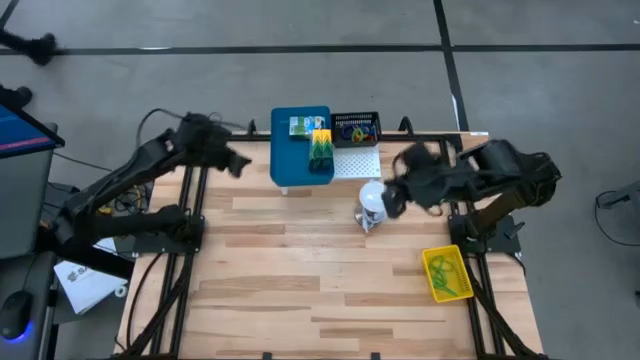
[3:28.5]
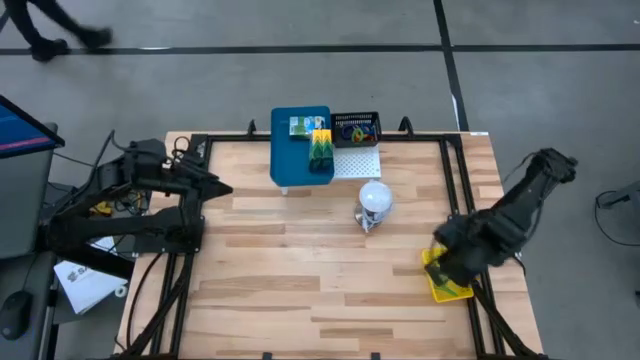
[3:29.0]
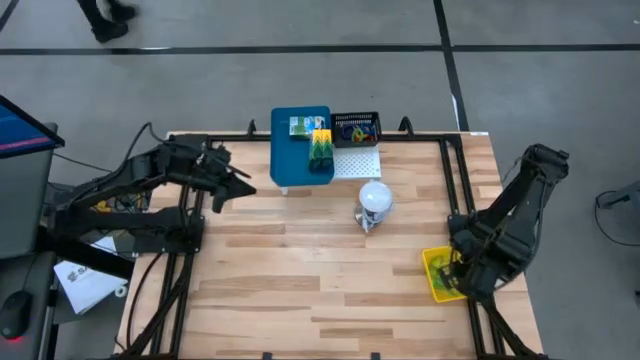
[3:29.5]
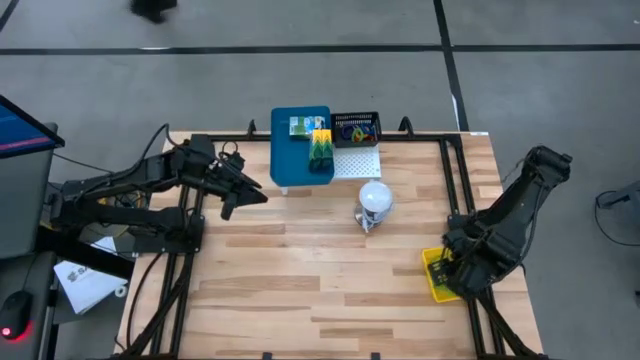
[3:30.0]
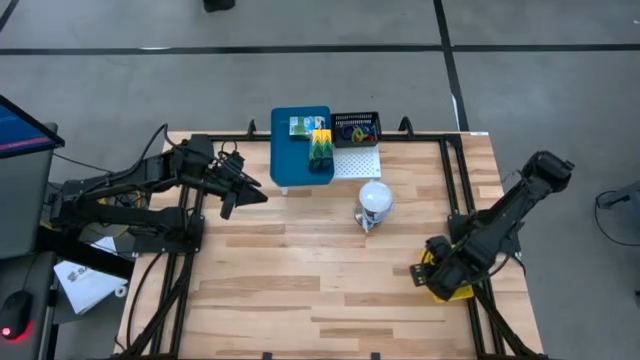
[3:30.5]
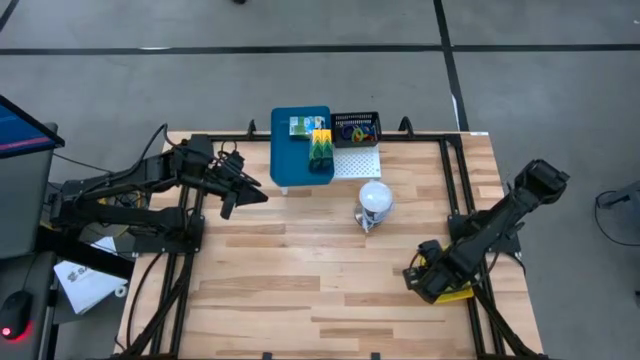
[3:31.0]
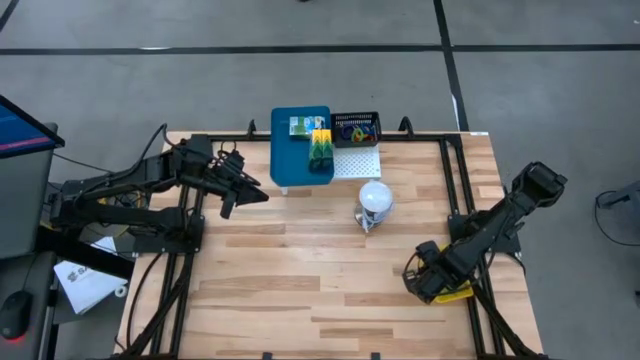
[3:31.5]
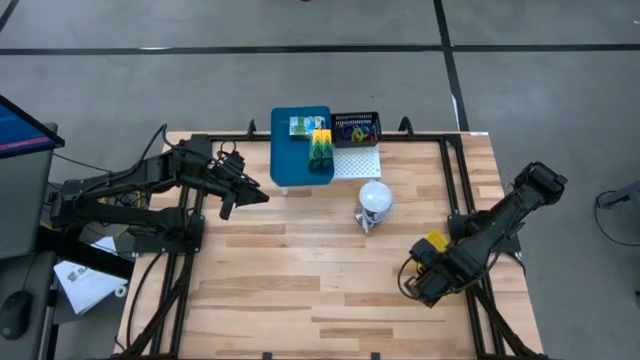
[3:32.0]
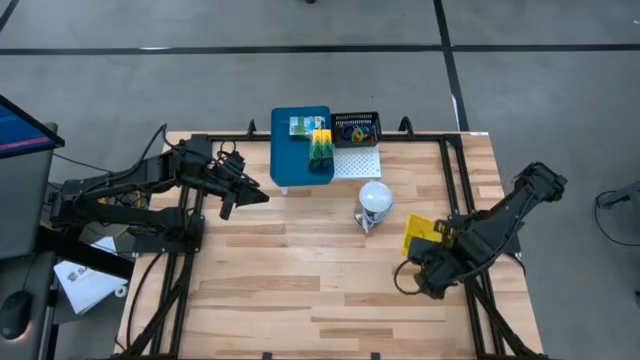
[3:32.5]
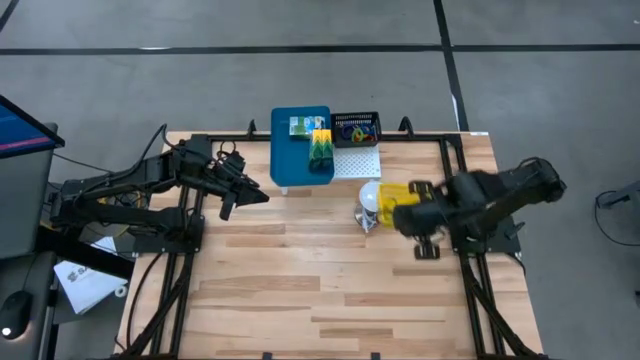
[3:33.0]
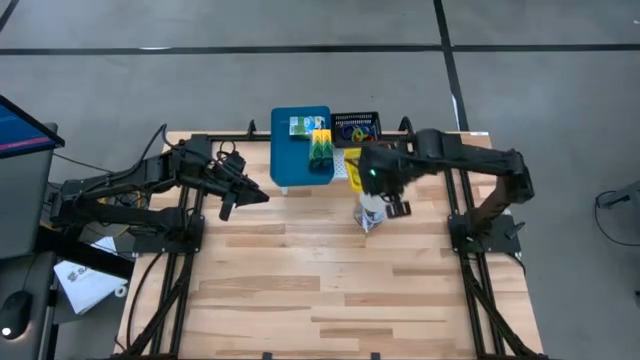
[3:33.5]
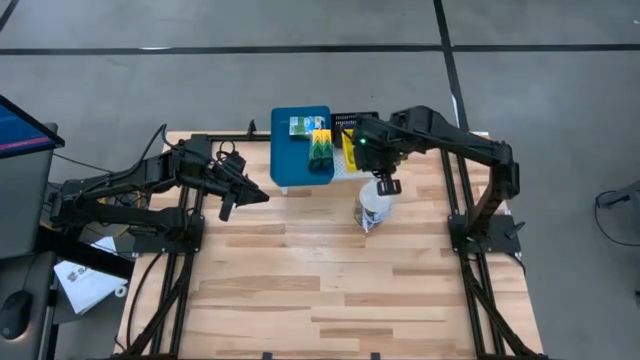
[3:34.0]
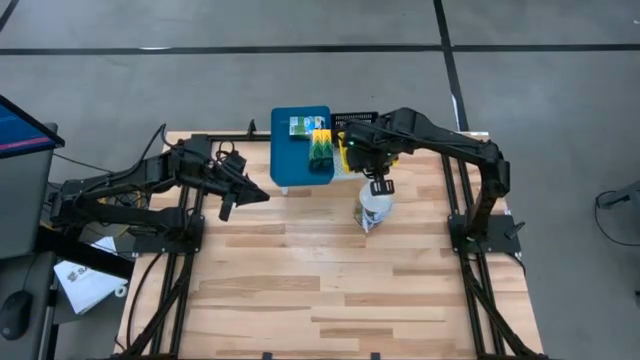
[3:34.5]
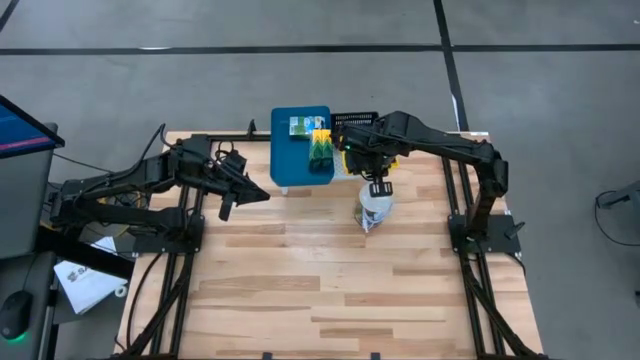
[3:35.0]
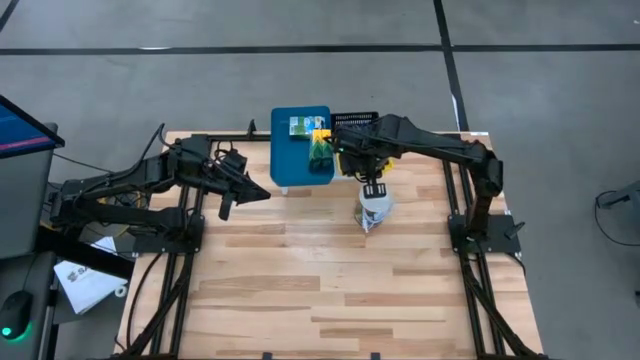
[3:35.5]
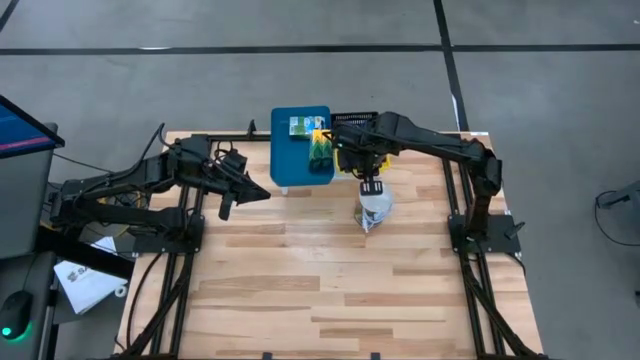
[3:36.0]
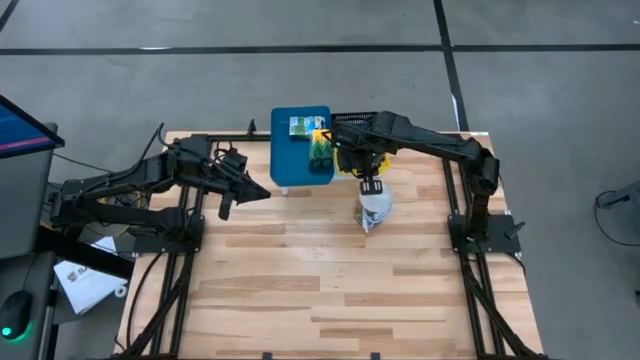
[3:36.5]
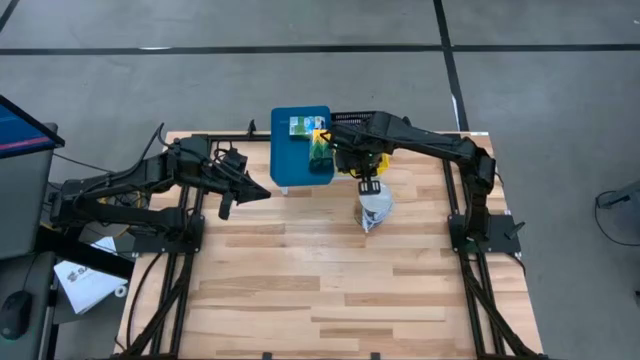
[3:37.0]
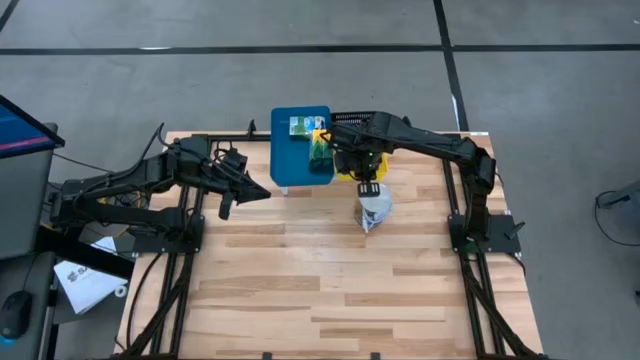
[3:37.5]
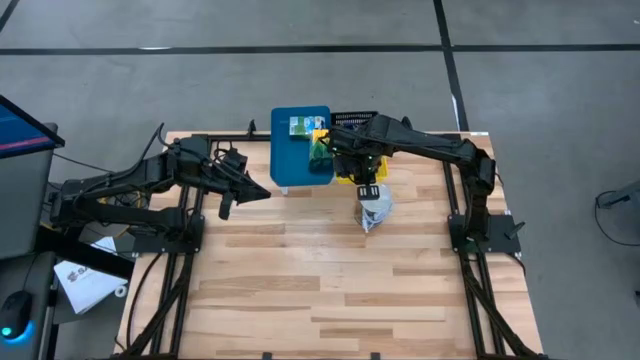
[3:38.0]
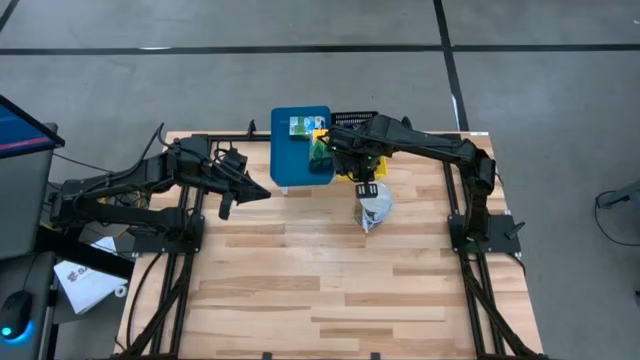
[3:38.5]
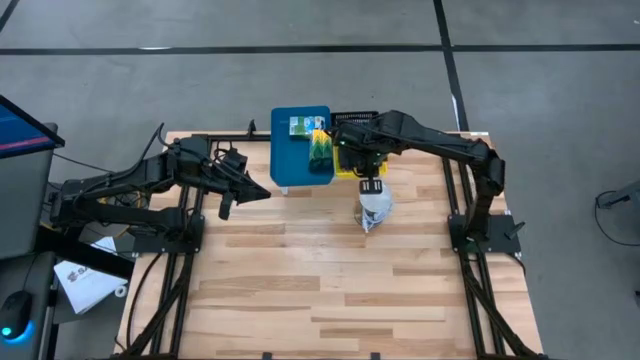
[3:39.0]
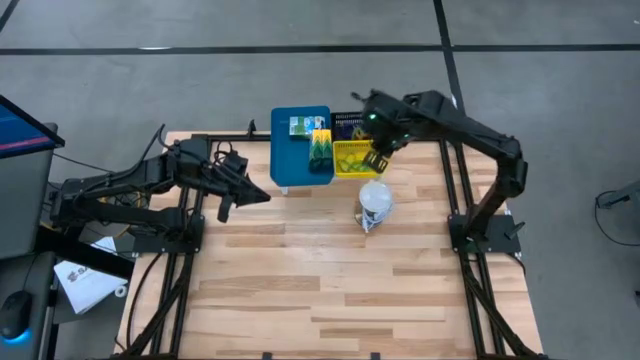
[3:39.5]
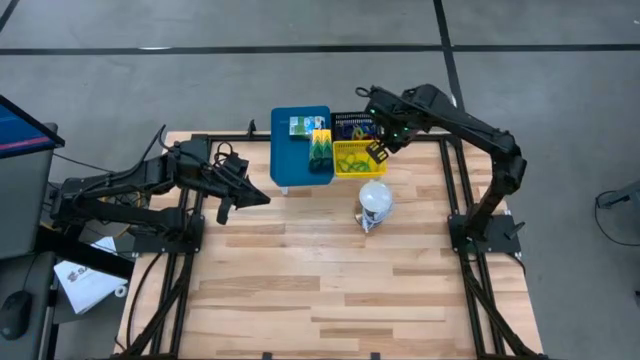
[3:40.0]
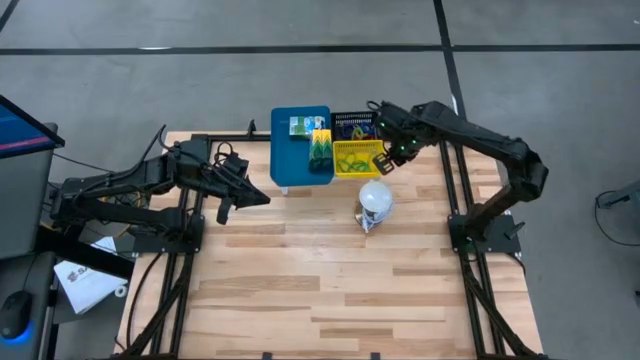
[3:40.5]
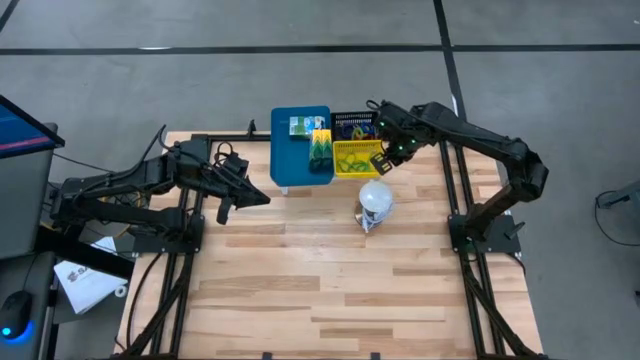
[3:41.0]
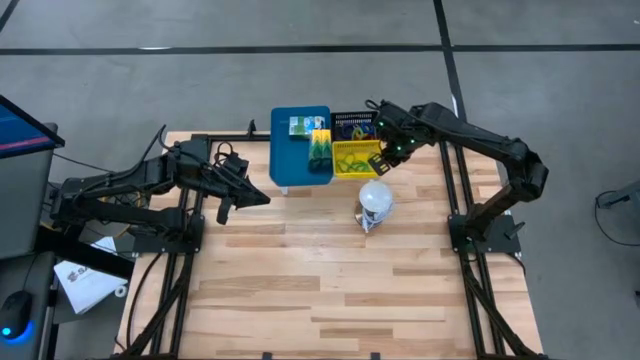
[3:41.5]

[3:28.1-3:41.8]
Task: Pick & Place Office Desk Supplies
Put the yellow bin with rubber bands on the shelf

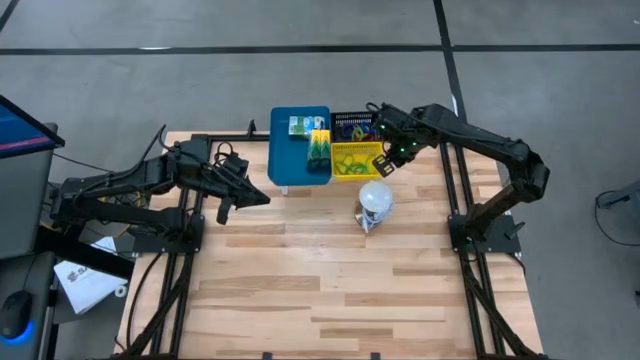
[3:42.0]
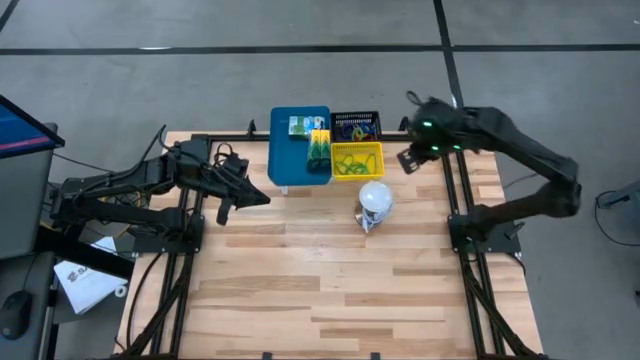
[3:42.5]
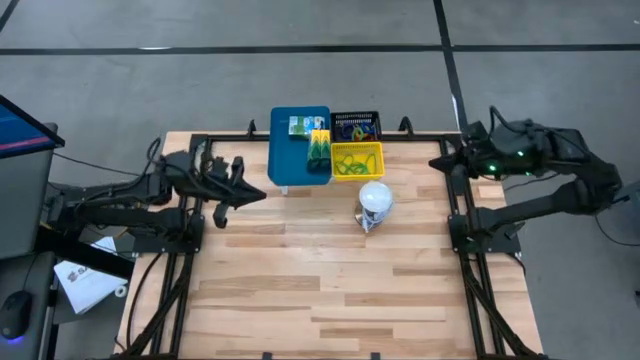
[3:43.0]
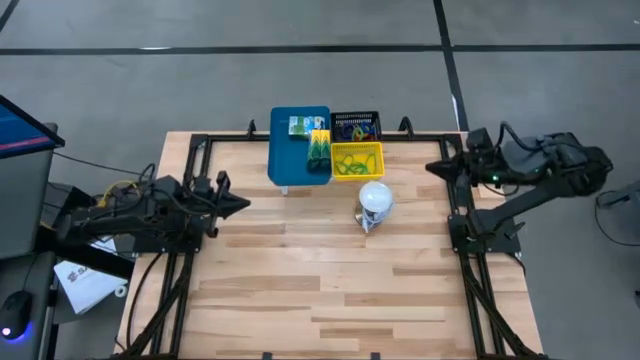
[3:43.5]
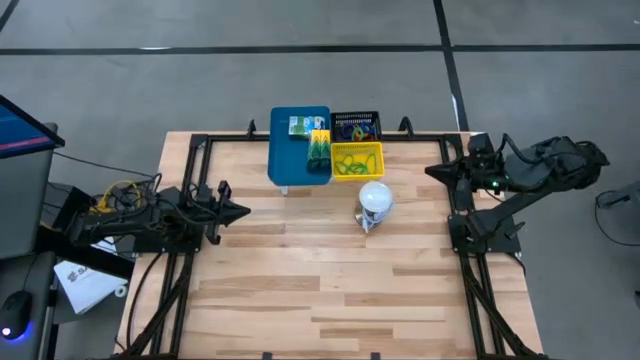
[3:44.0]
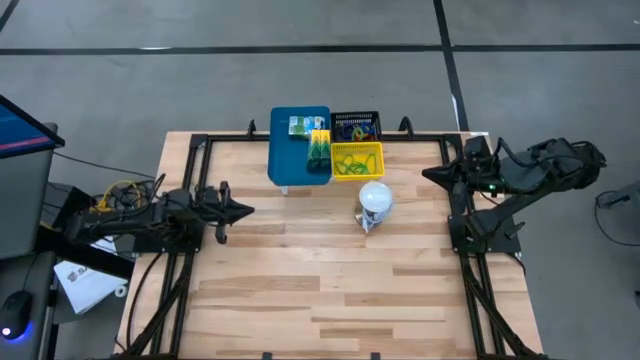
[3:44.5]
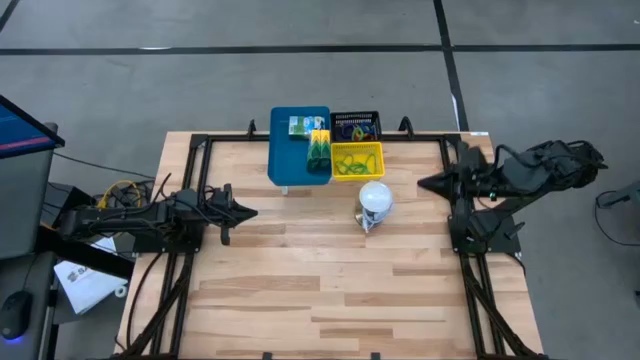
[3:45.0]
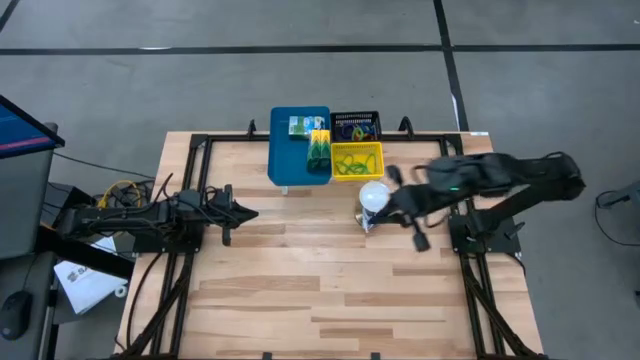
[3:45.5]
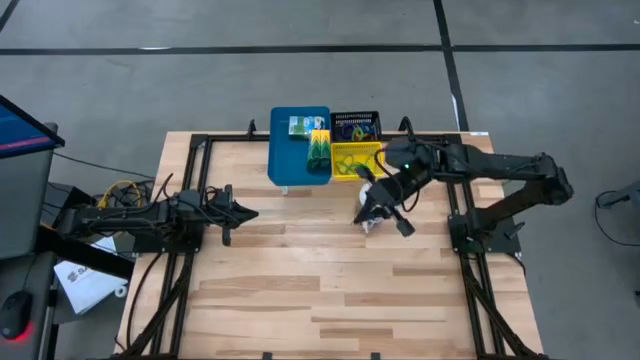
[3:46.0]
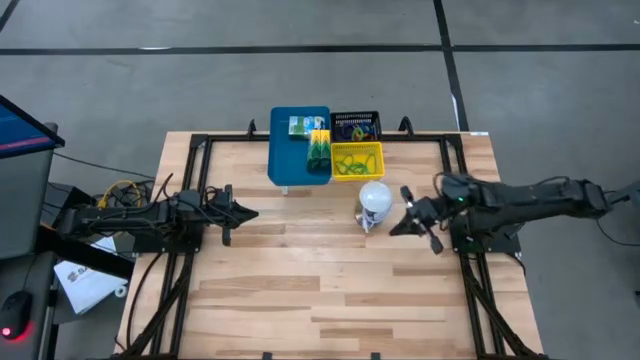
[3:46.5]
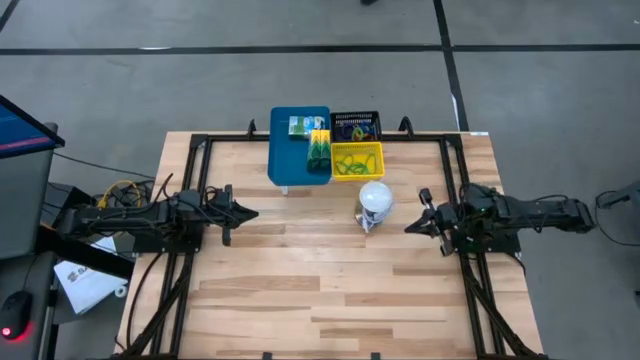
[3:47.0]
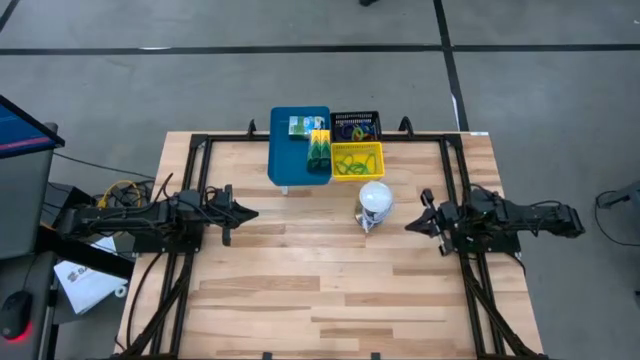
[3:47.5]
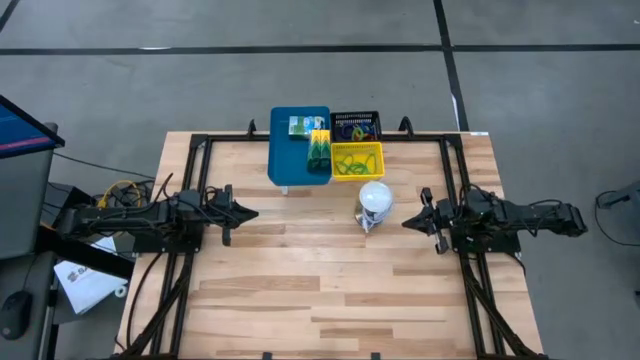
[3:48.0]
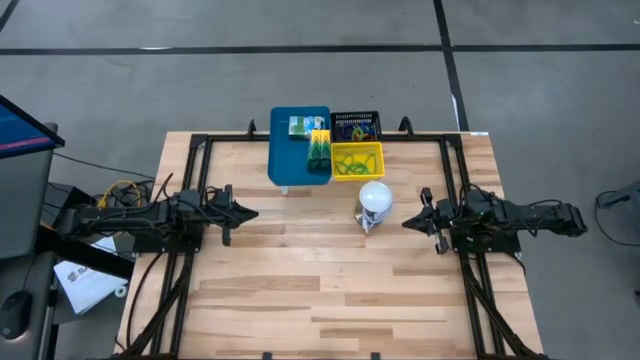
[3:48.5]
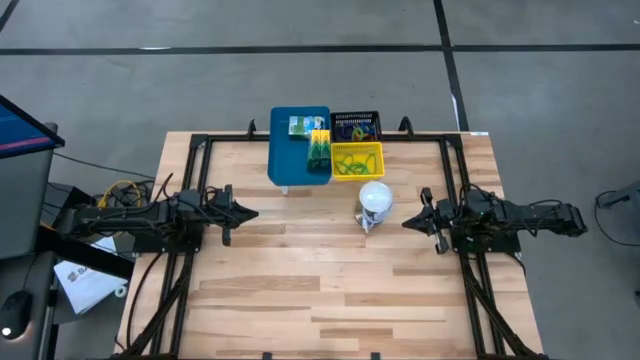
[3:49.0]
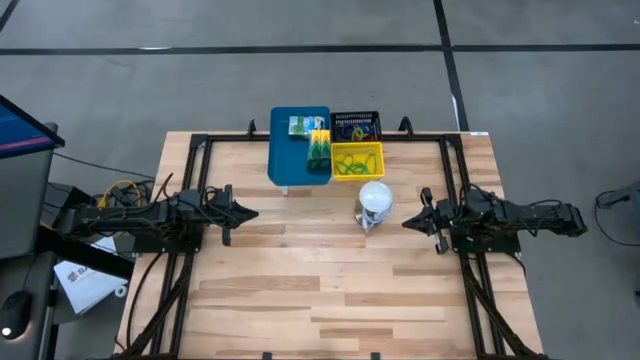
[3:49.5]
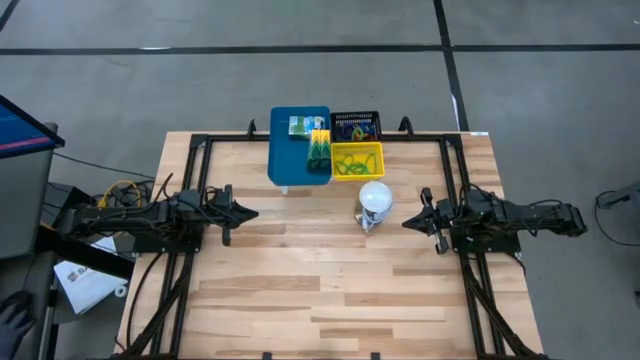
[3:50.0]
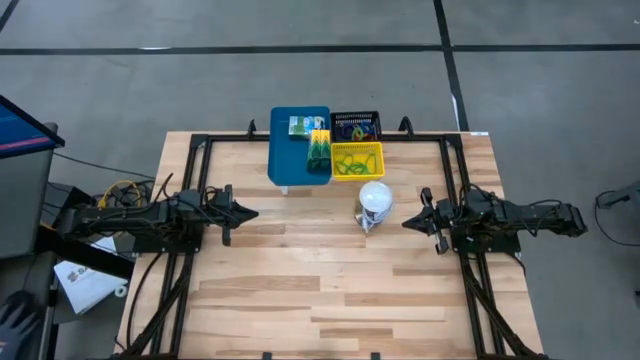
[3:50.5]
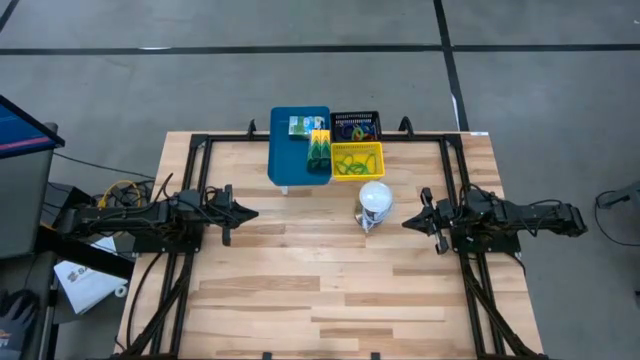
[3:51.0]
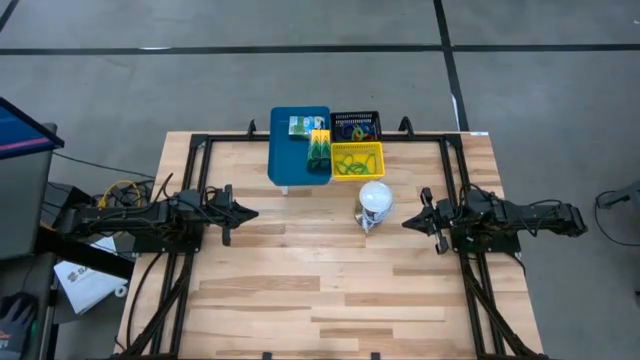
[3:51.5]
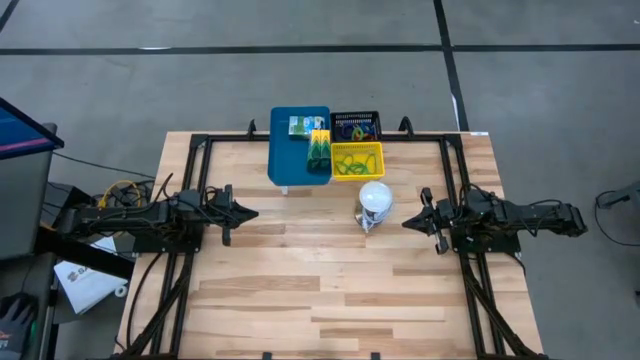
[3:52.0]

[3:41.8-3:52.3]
Return to Home Position
